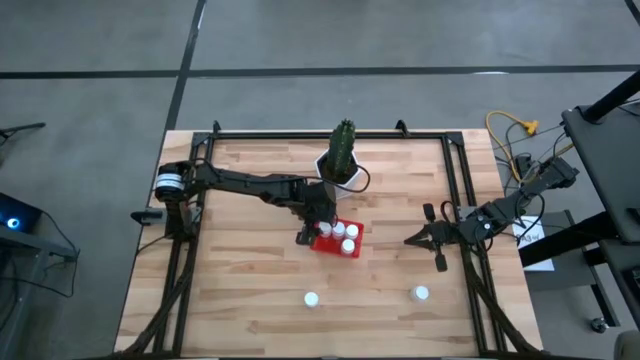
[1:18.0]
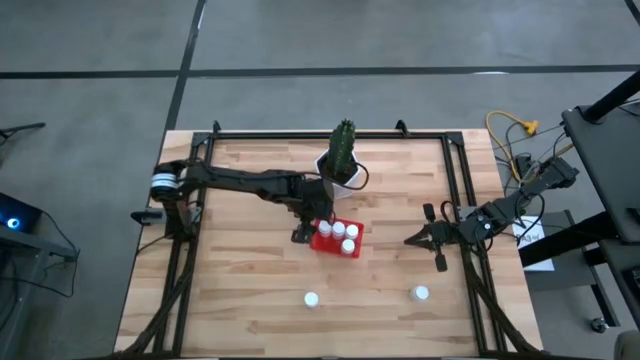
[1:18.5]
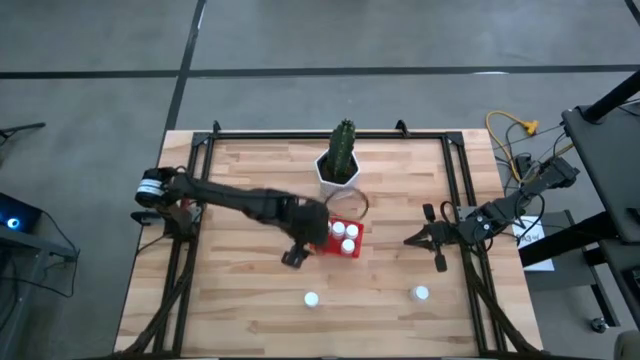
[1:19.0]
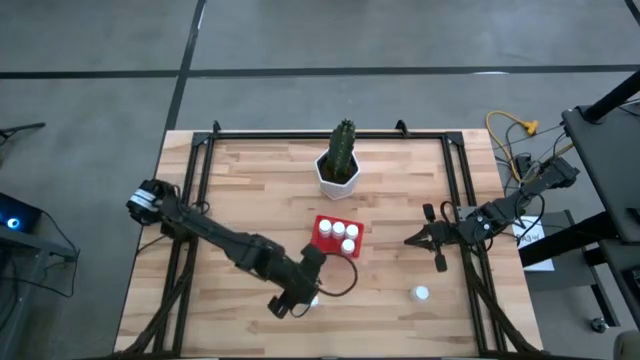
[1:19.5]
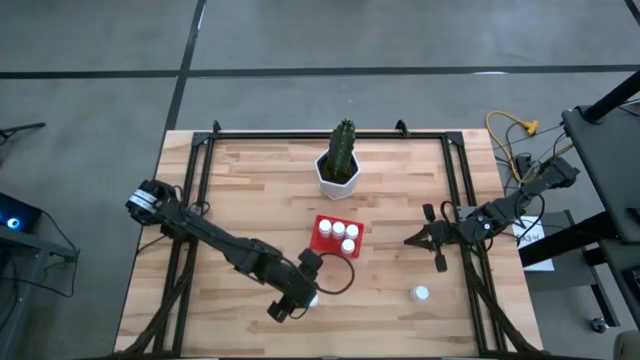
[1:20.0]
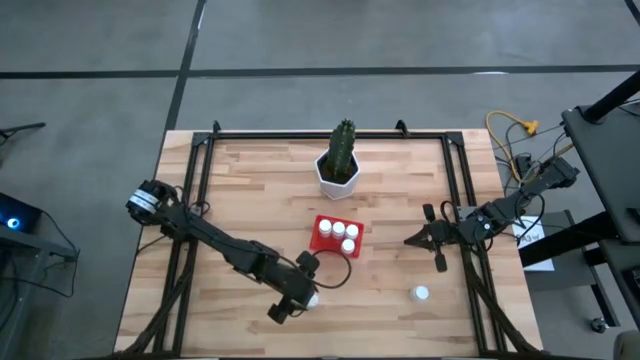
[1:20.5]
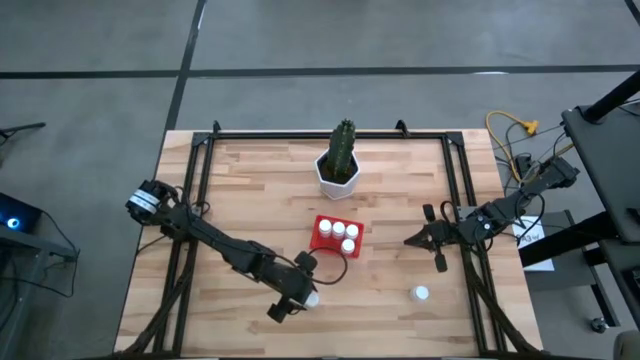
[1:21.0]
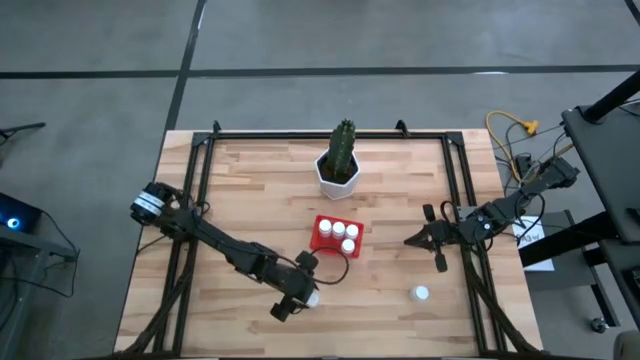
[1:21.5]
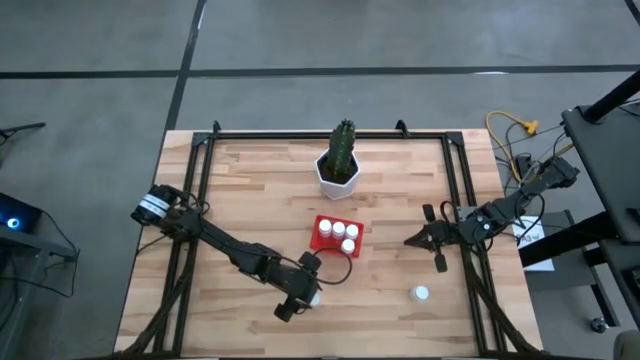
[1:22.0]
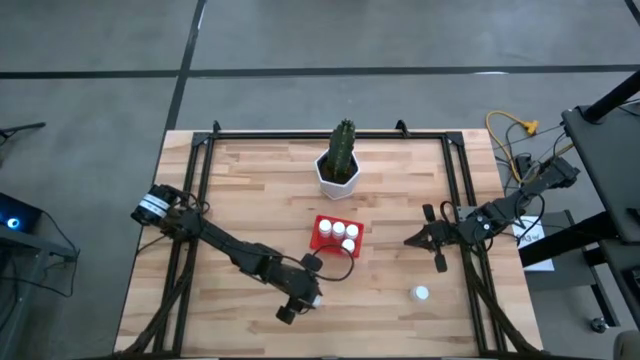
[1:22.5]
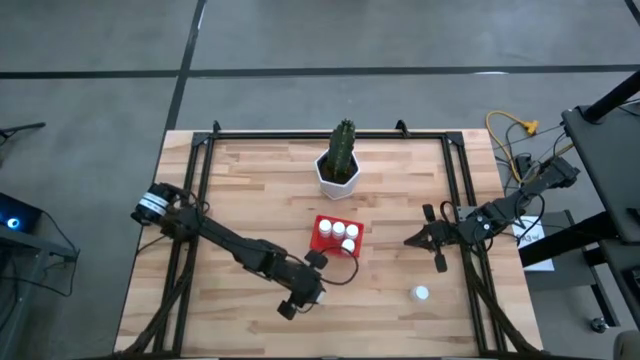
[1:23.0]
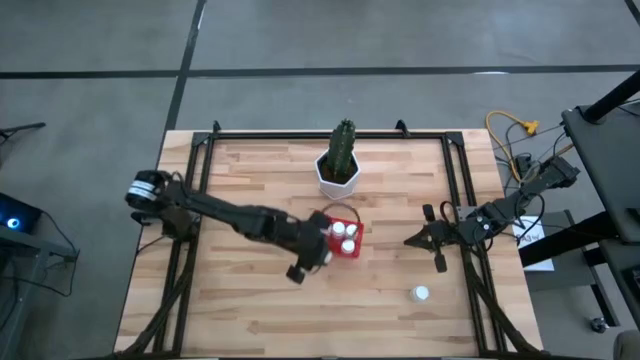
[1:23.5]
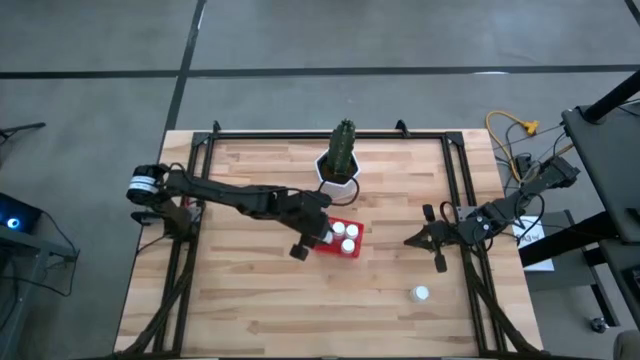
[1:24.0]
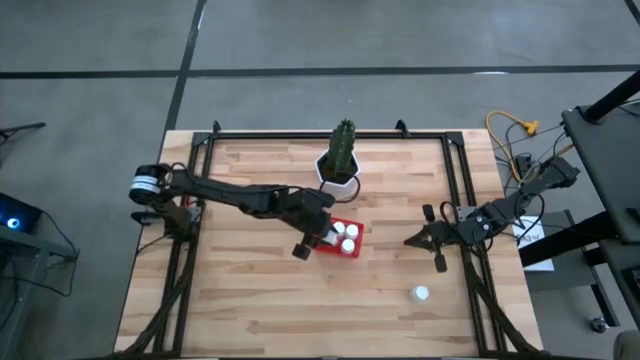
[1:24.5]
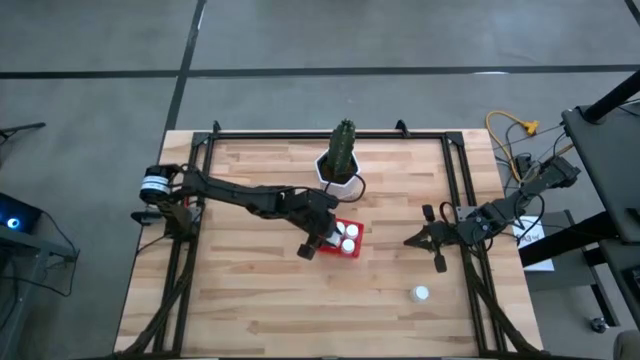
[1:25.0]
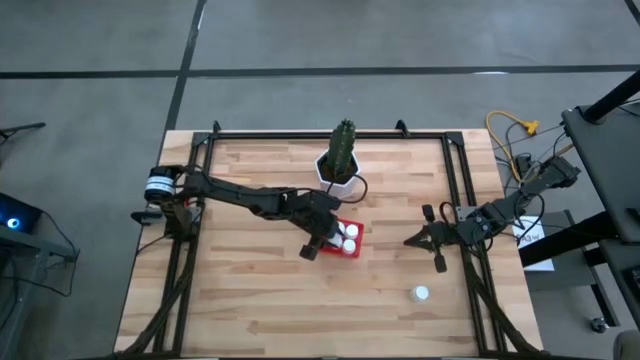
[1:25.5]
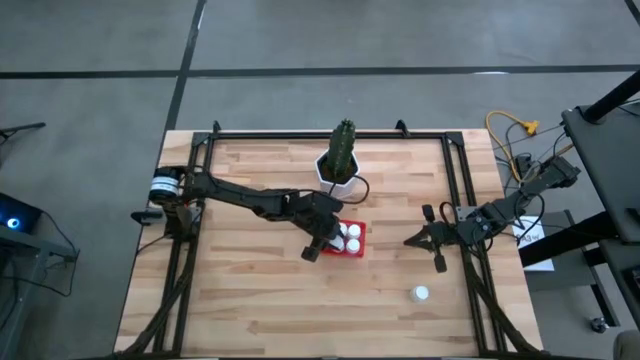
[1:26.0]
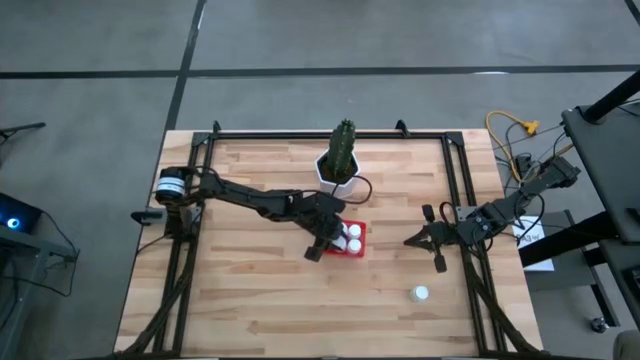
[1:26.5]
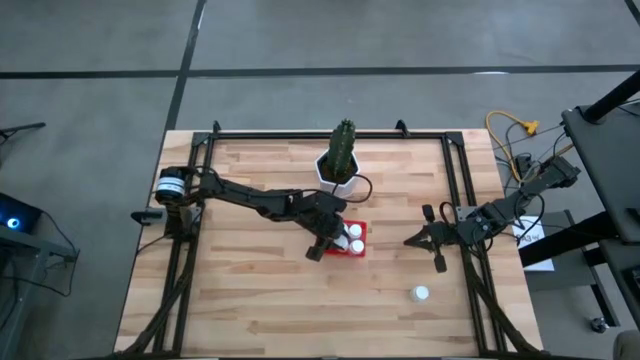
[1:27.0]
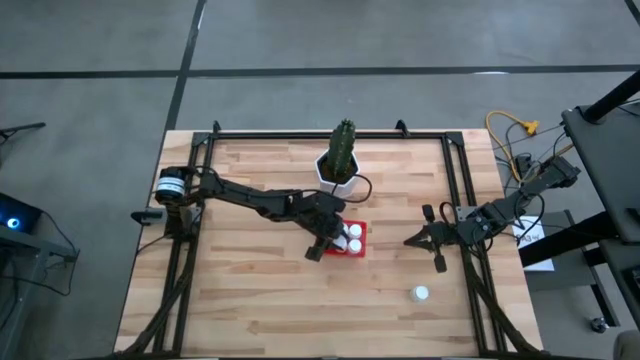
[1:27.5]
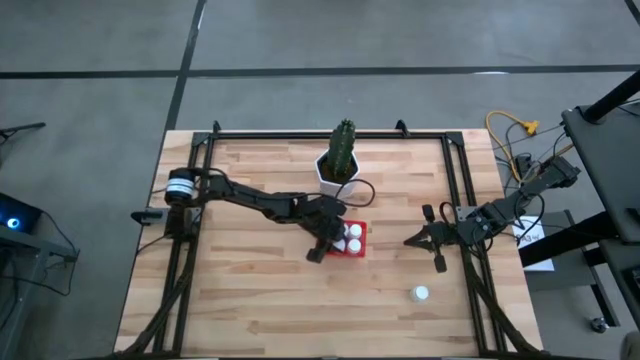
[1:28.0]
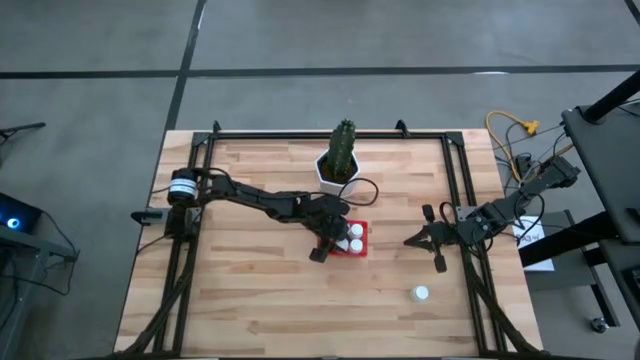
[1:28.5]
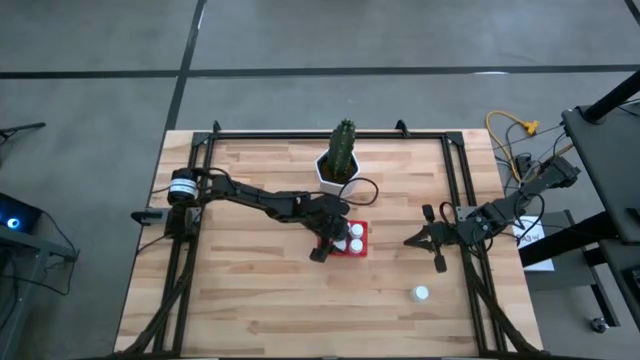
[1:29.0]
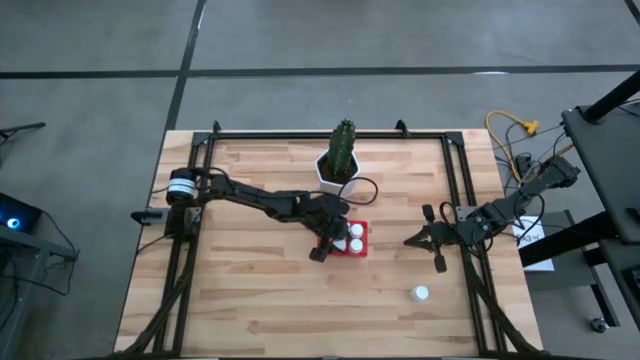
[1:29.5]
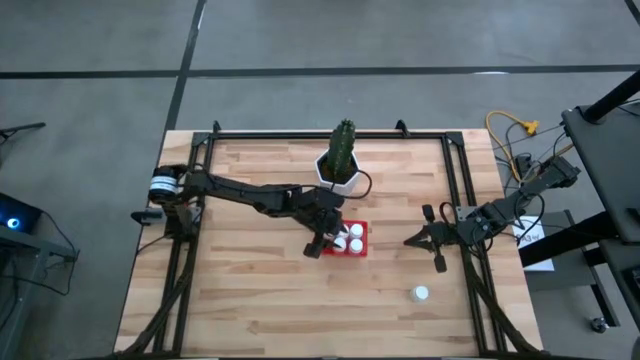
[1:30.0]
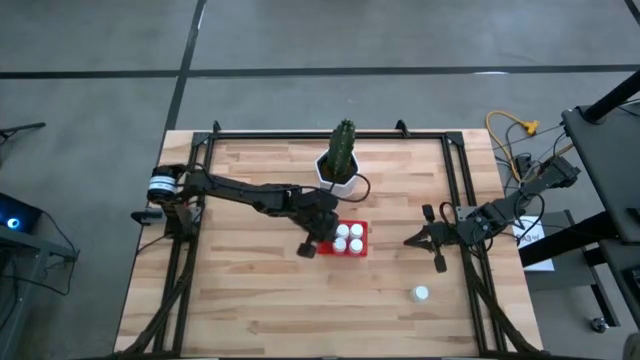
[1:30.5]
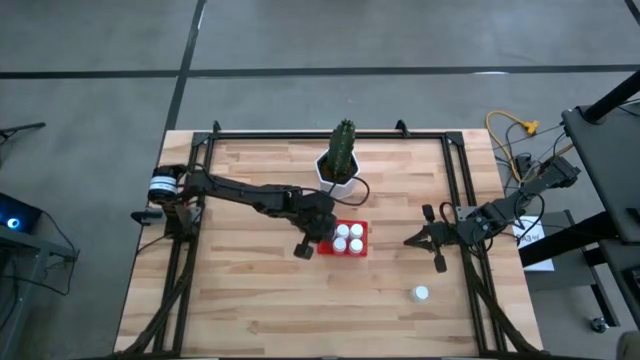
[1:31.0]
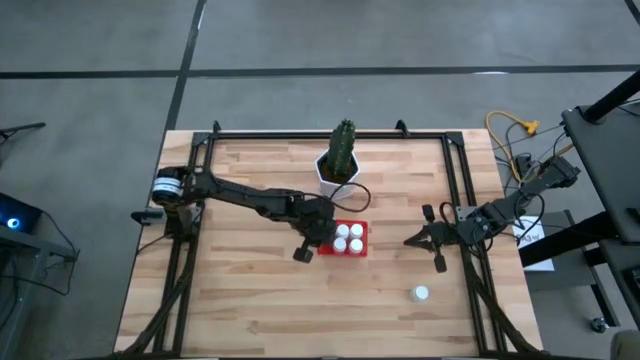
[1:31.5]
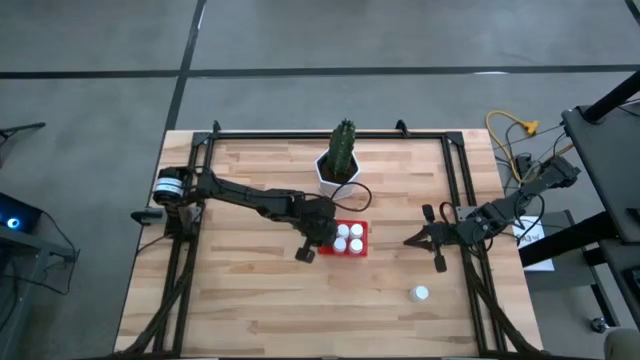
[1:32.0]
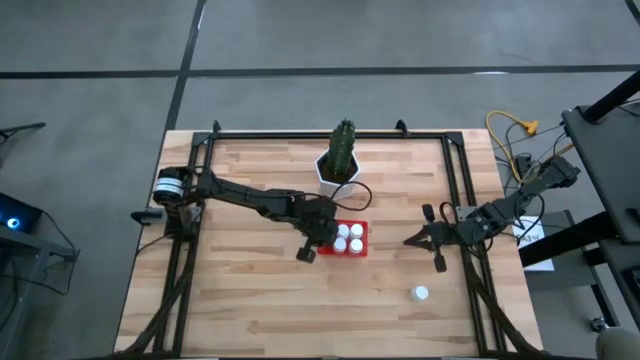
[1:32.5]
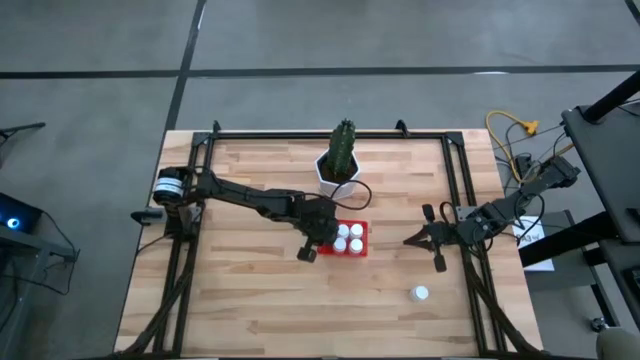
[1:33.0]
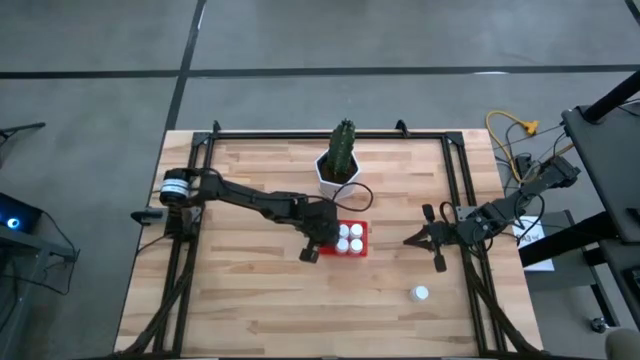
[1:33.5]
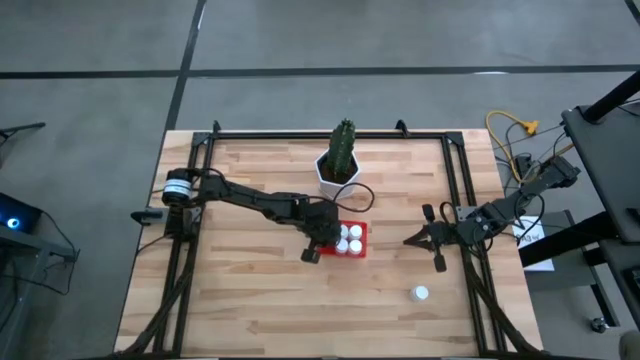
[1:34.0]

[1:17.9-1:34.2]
Task: Pick and place pill bottles into a basket
Put the left white pill bottle into the red bin

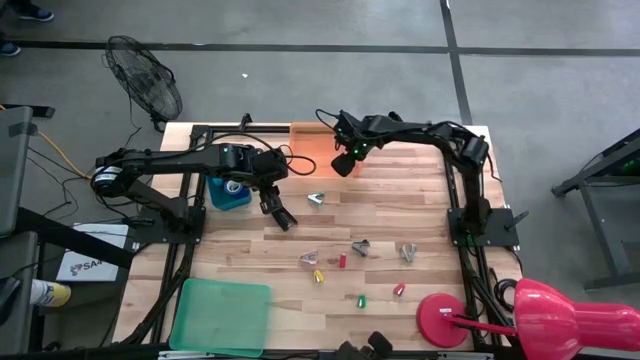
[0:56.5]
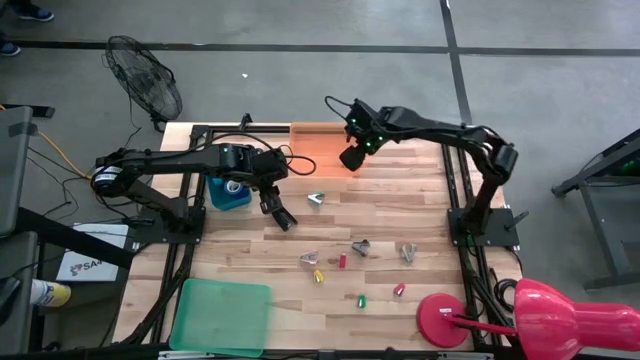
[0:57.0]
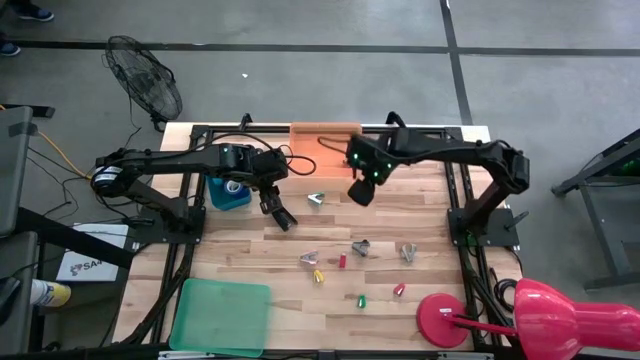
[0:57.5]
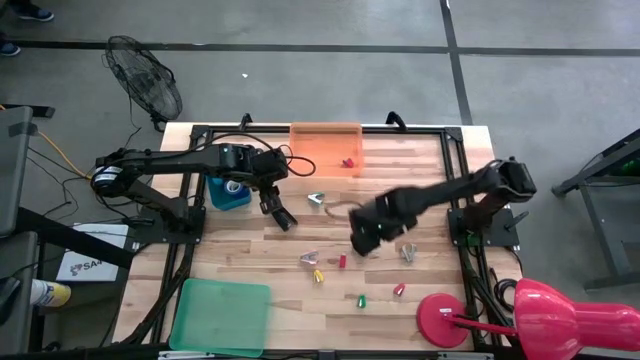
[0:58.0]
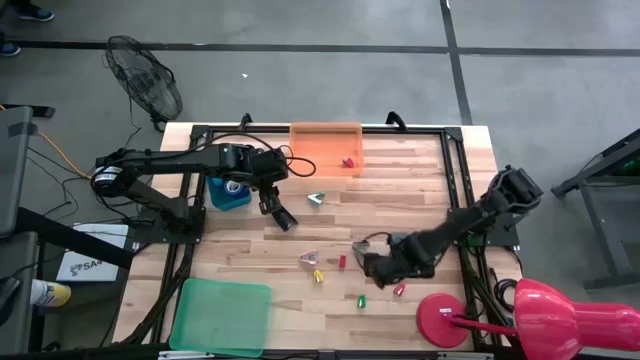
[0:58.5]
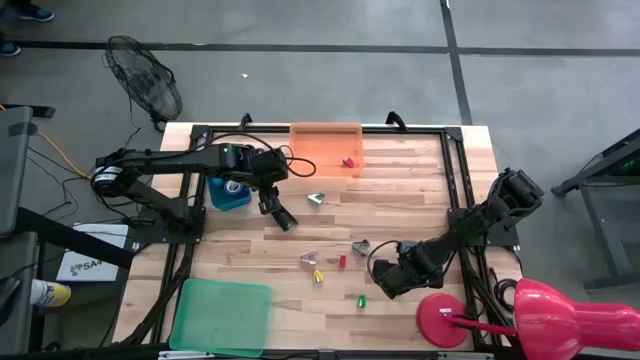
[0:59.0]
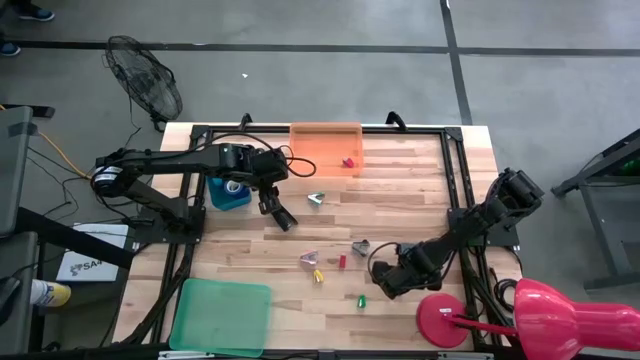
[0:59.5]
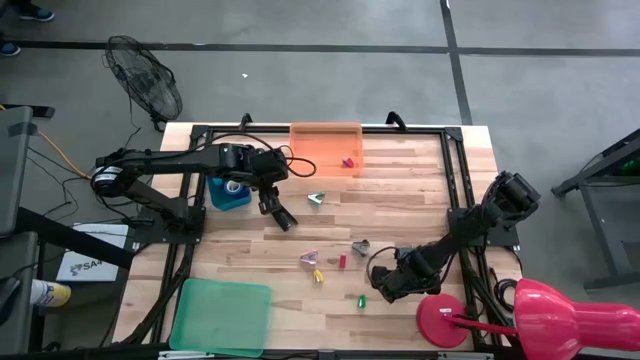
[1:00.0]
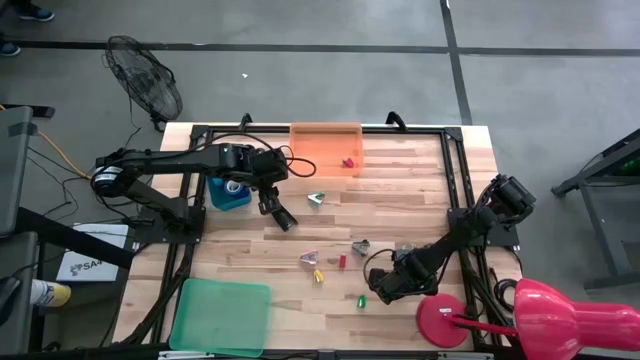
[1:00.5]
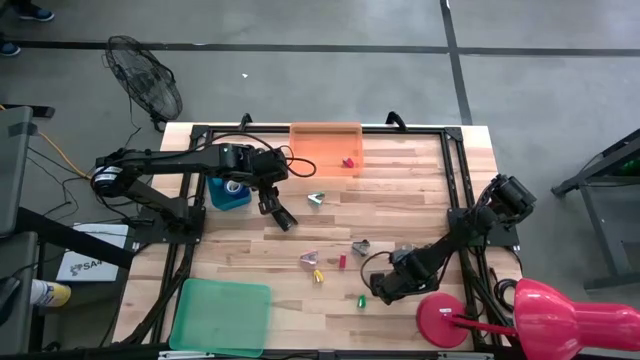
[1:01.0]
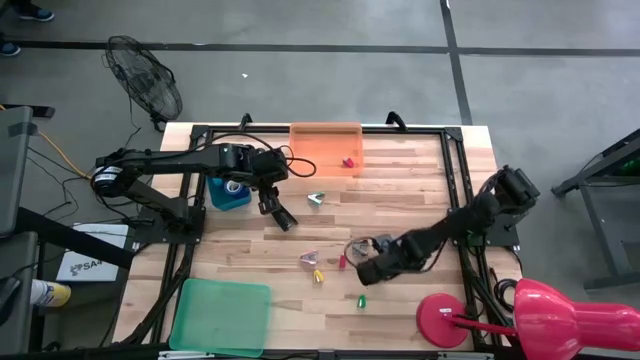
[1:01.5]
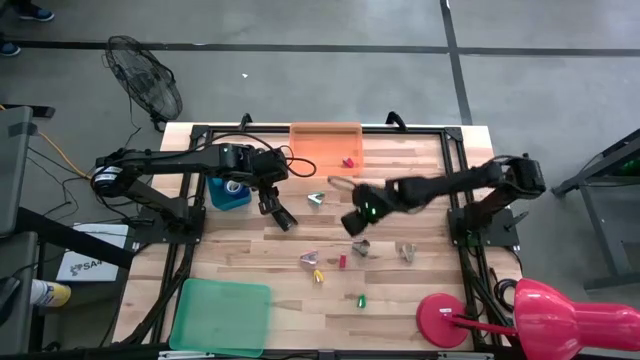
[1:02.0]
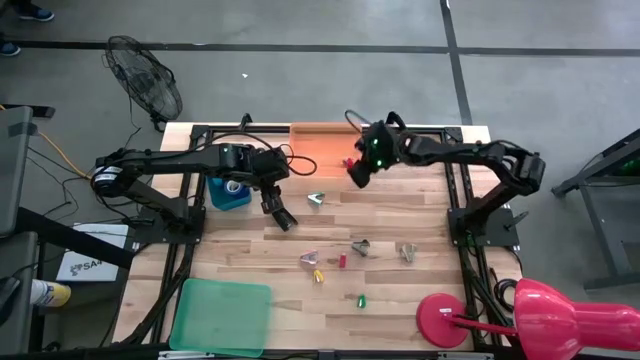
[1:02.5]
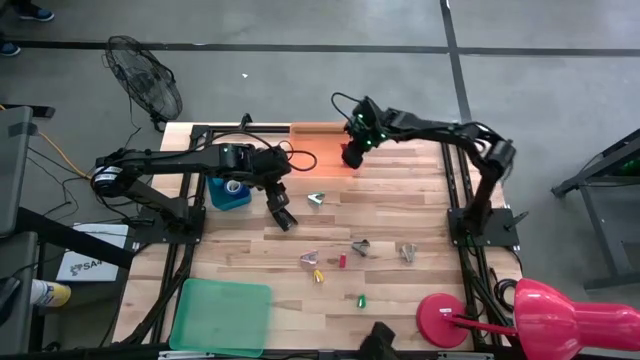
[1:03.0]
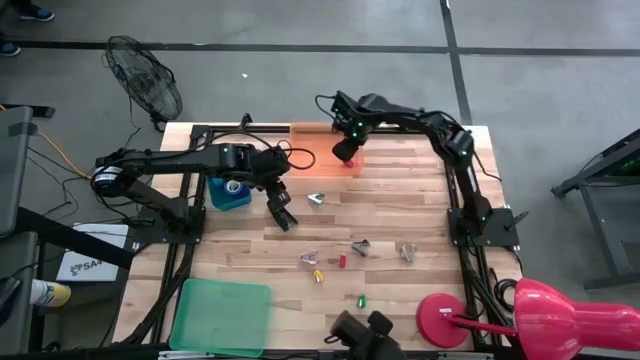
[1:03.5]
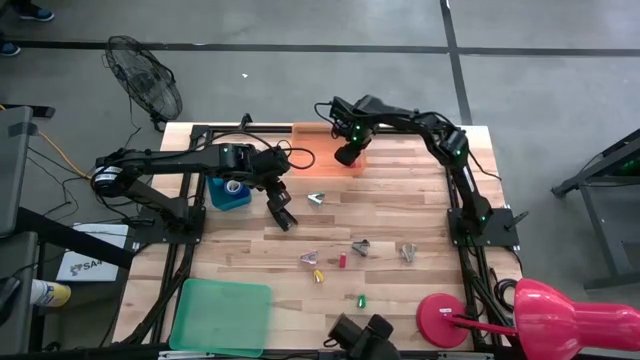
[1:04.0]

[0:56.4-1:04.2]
Task: Pick and place Stapler, Stapler remover, tape
Put the red stapler into the orange bin
